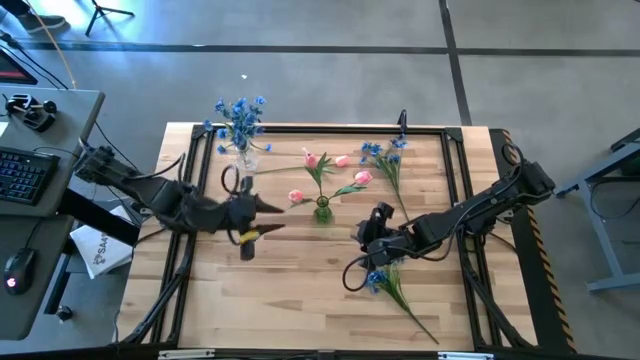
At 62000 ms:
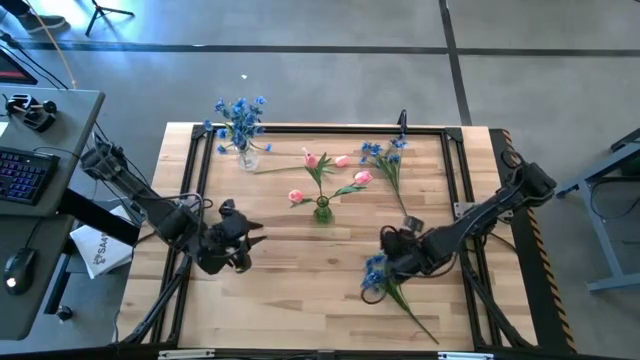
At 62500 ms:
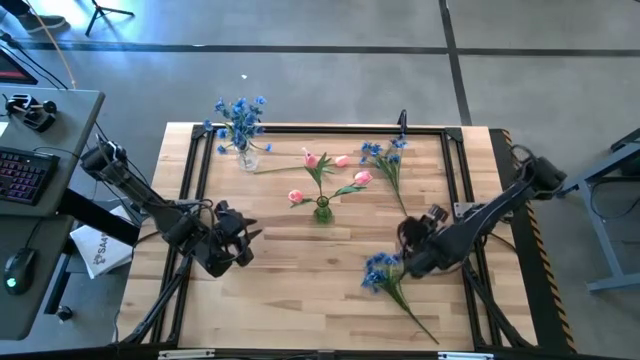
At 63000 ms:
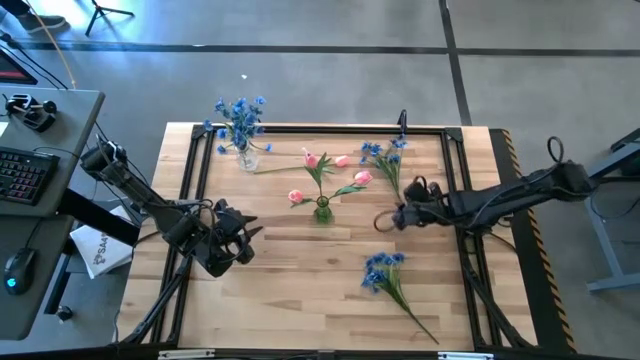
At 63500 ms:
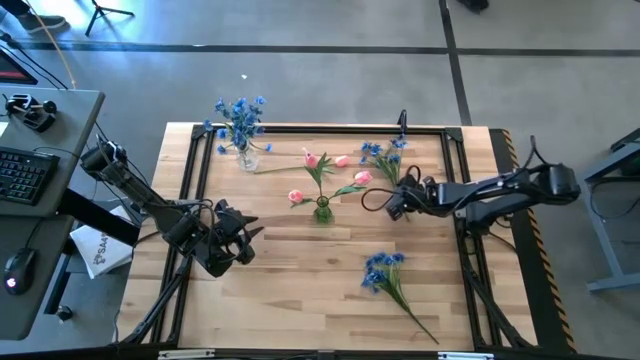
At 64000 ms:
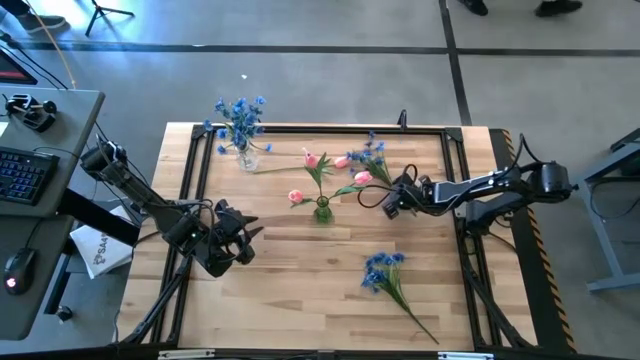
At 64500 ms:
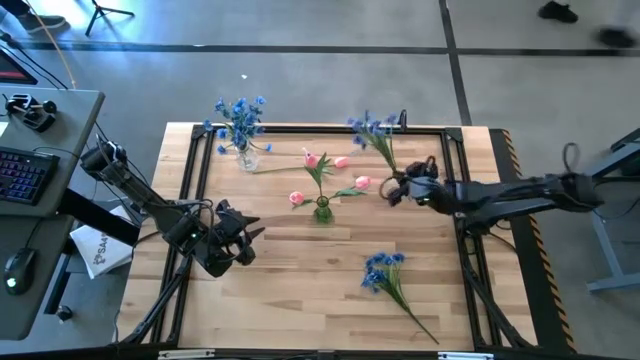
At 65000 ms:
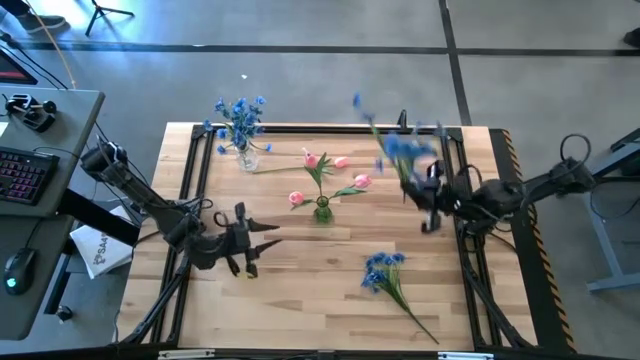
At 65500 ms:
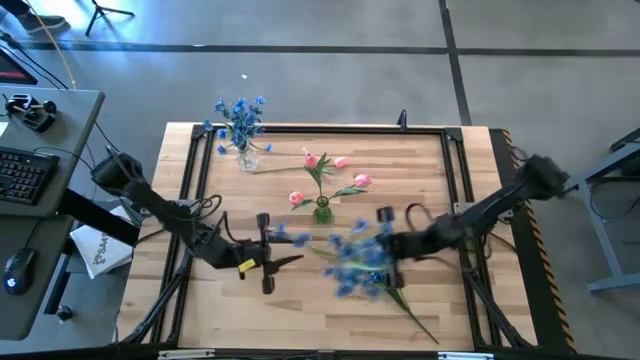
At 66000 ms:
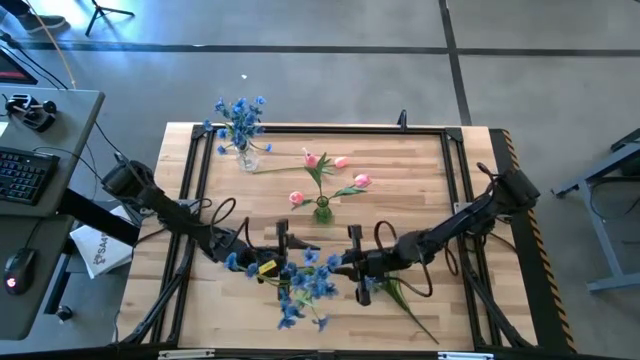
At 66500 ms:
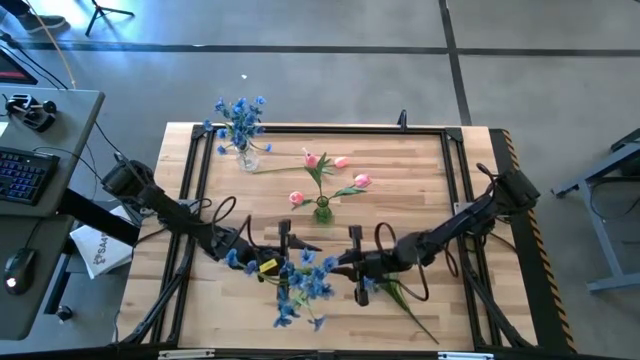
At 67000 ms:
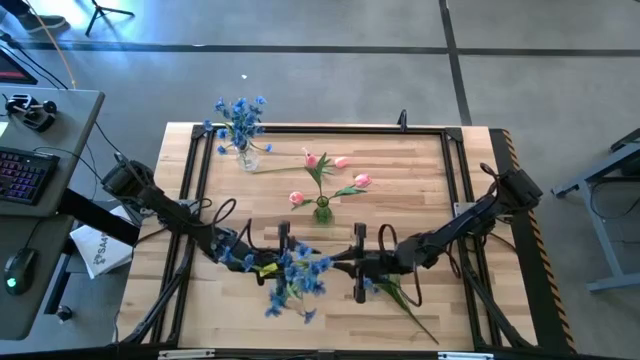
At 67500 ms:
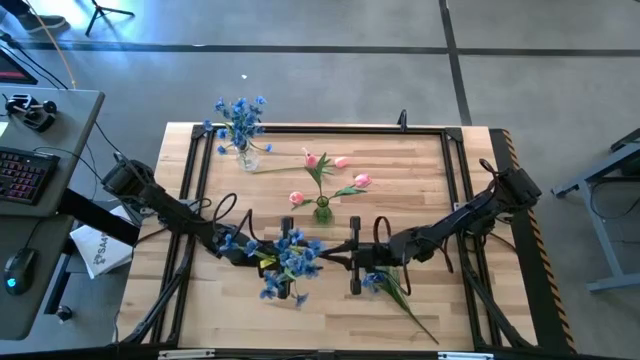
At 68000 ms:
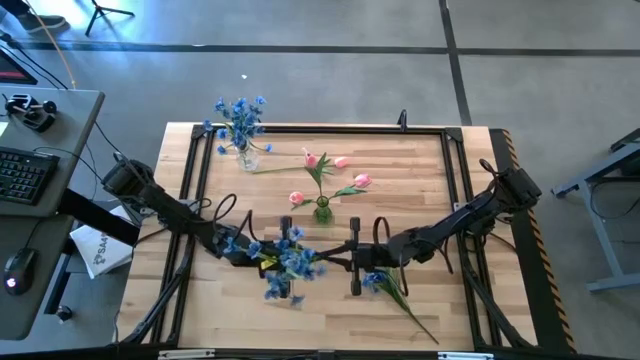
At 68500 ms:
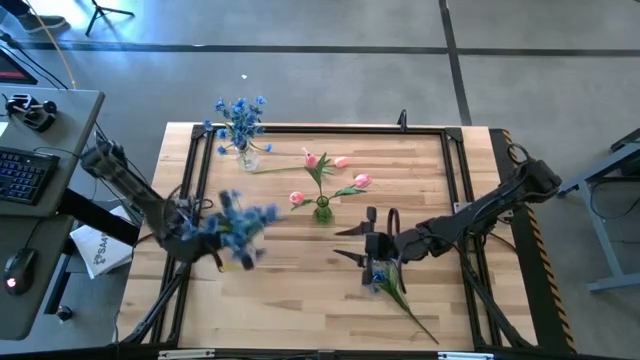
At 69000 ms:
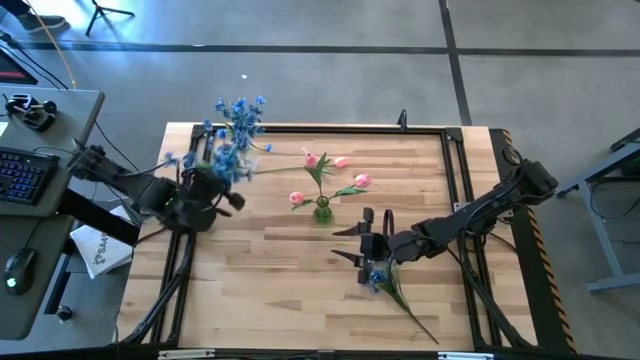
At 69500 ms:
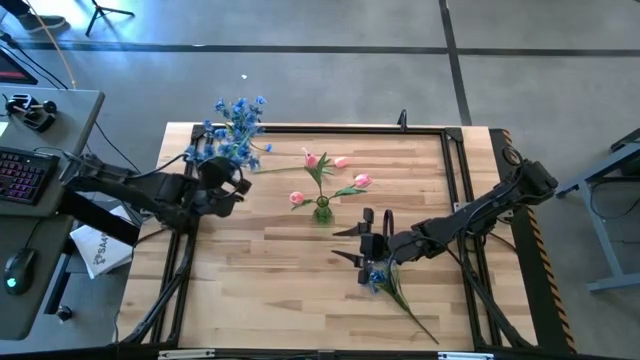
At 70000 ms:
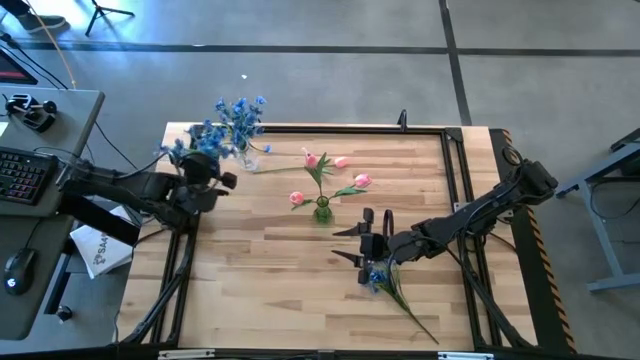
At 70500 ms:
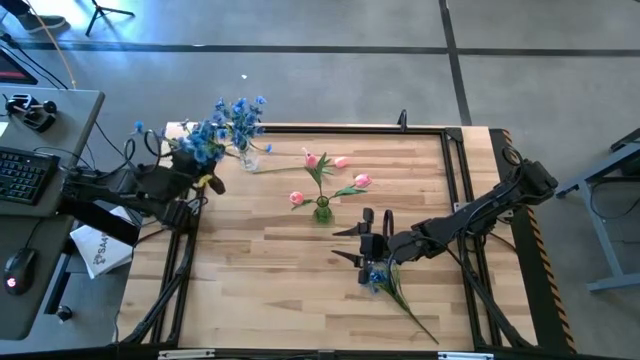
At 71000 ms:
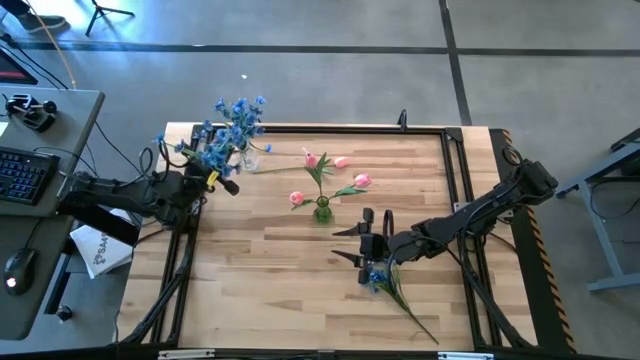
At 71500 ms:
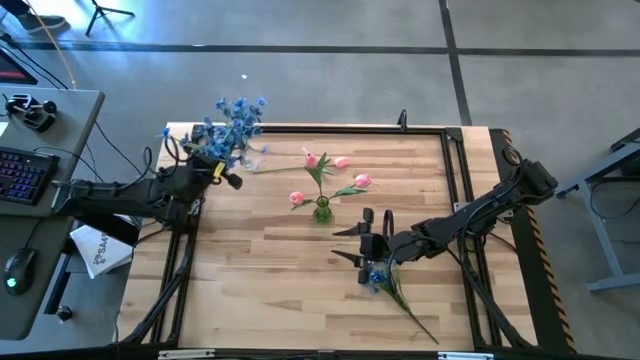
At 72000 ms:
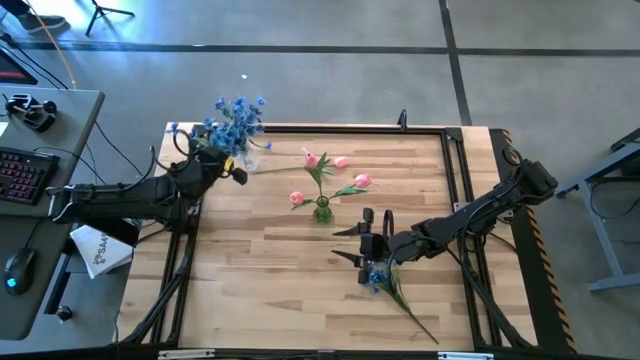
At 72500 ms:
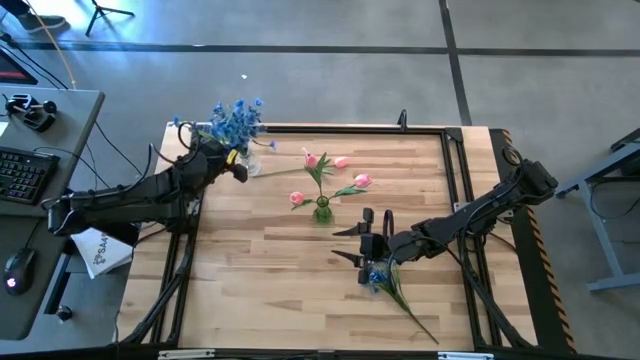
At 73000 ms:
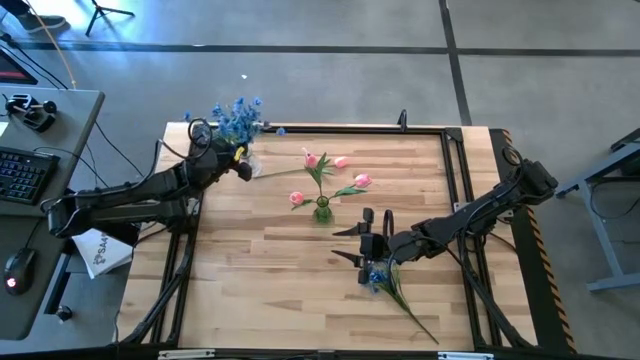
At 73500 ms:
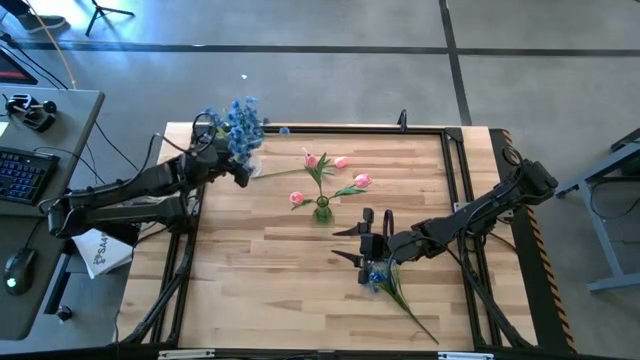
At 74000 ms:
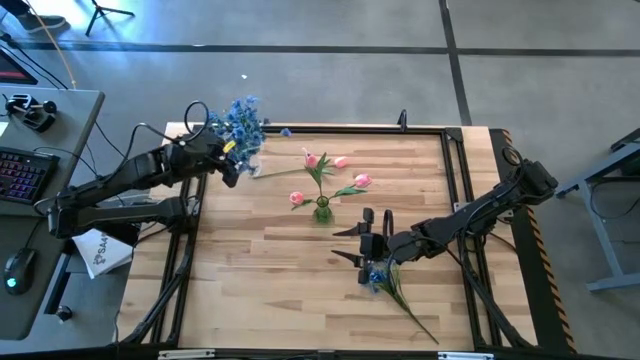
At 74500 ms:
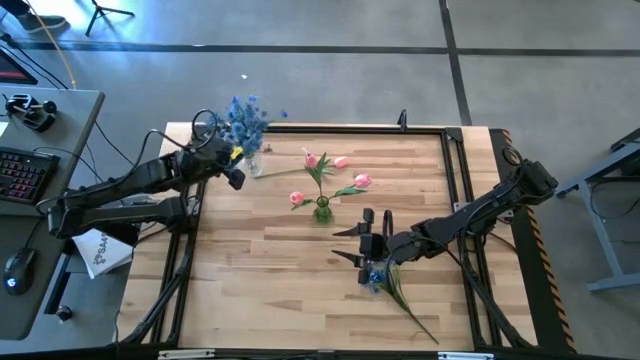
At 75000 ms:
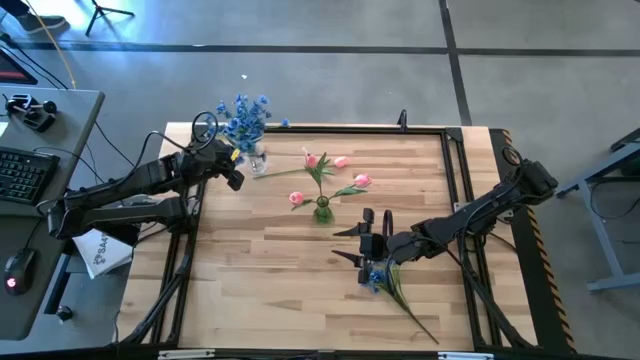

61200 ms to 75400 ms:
Task: Sort flowers into vase by color
Put the blue flowers into the transparent vase

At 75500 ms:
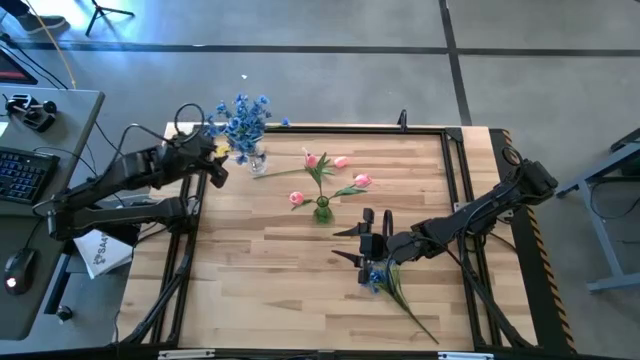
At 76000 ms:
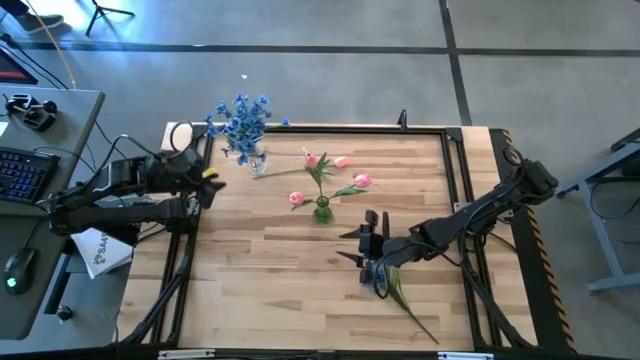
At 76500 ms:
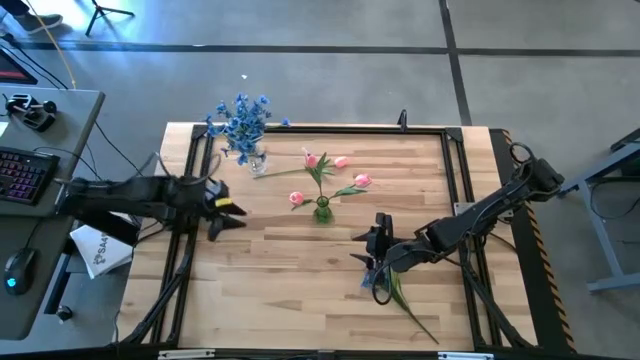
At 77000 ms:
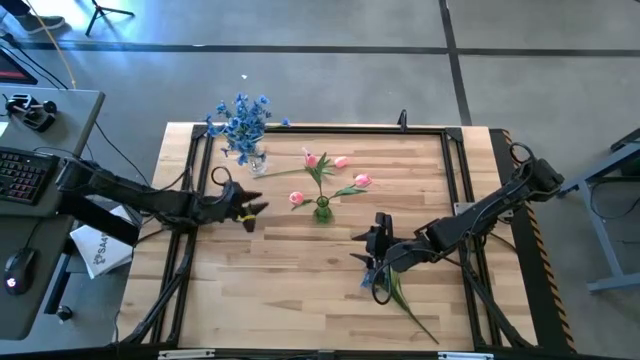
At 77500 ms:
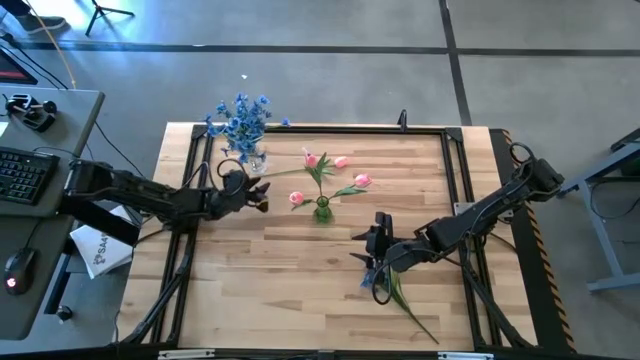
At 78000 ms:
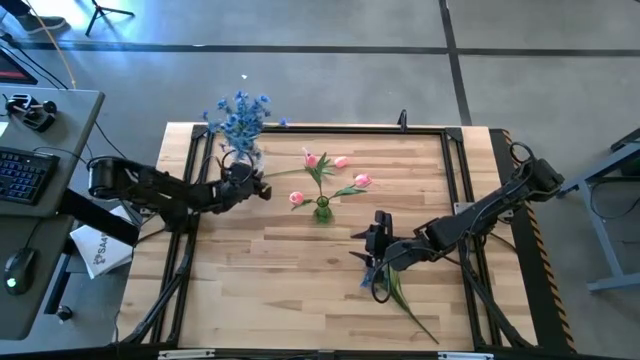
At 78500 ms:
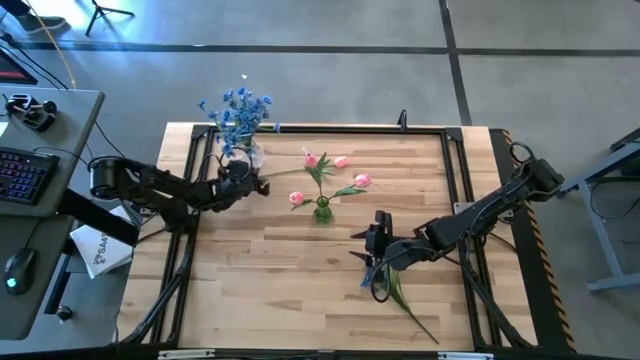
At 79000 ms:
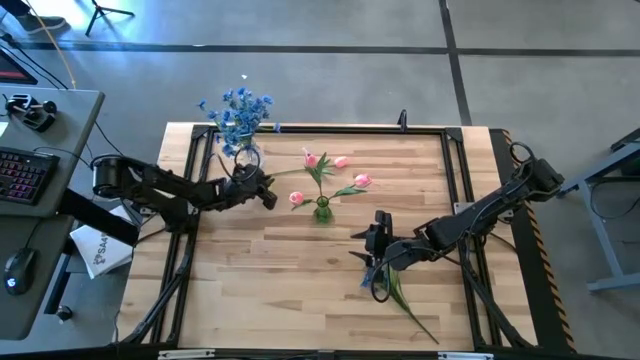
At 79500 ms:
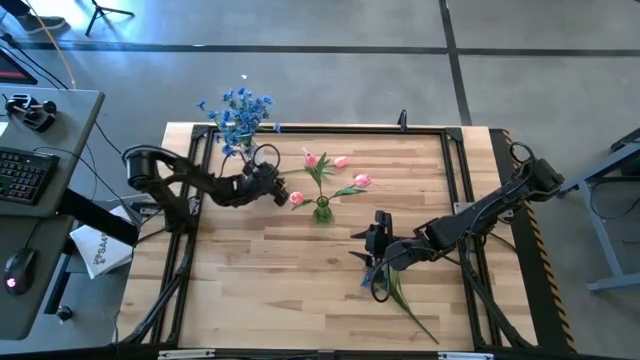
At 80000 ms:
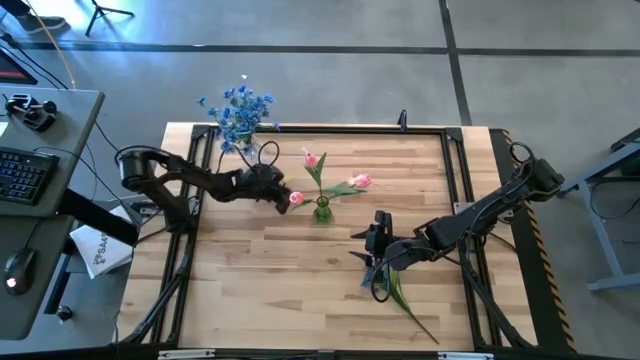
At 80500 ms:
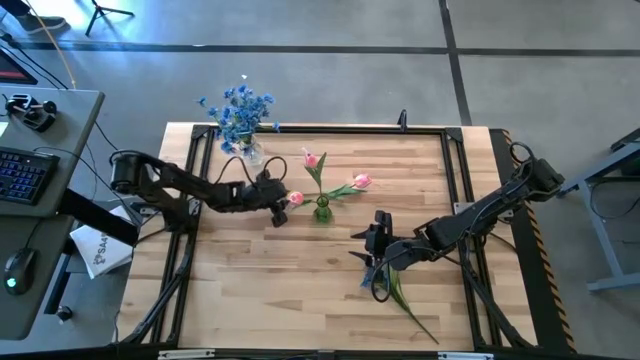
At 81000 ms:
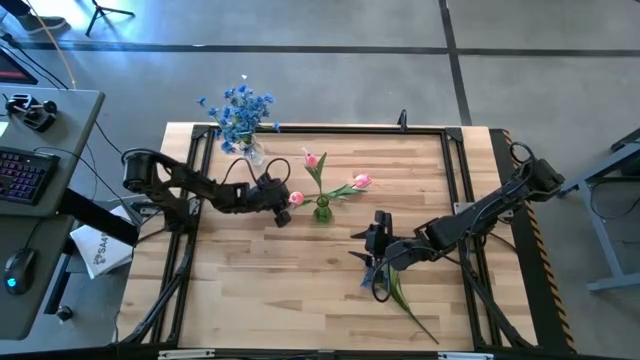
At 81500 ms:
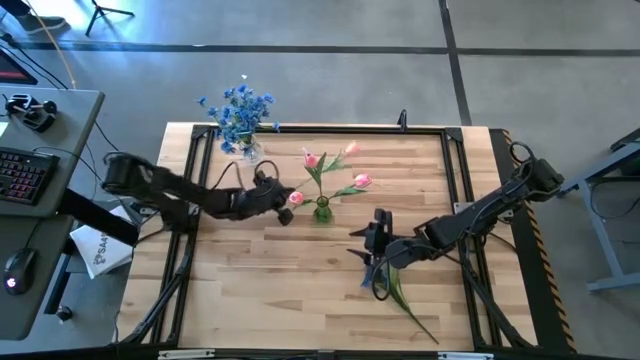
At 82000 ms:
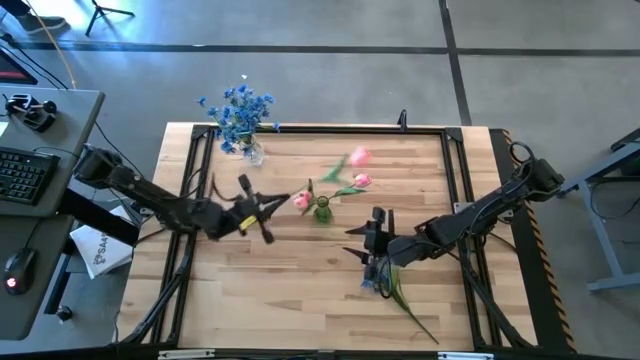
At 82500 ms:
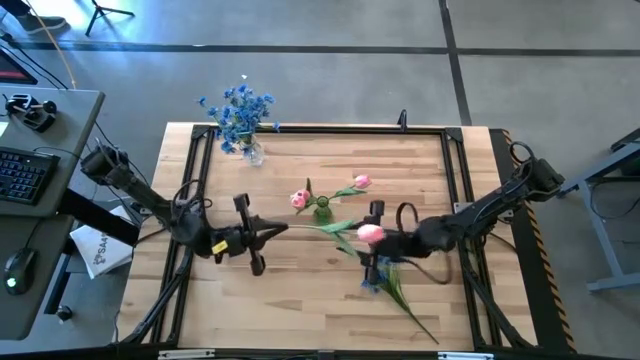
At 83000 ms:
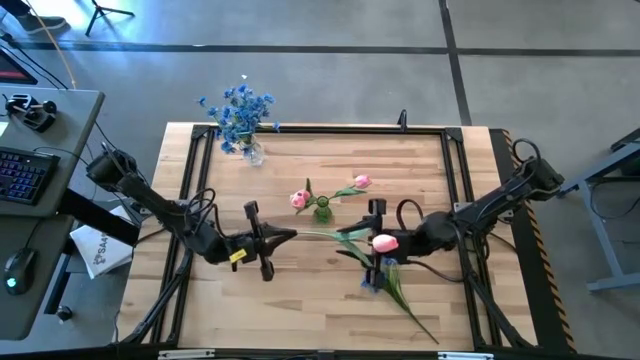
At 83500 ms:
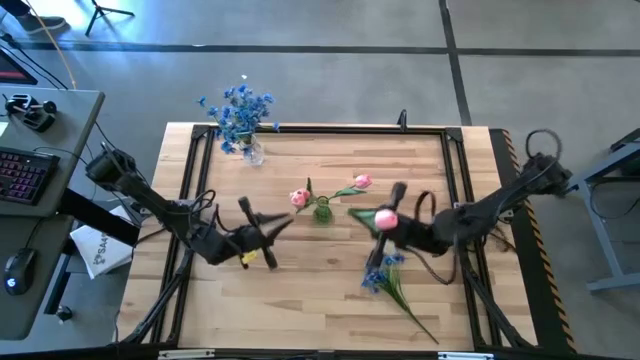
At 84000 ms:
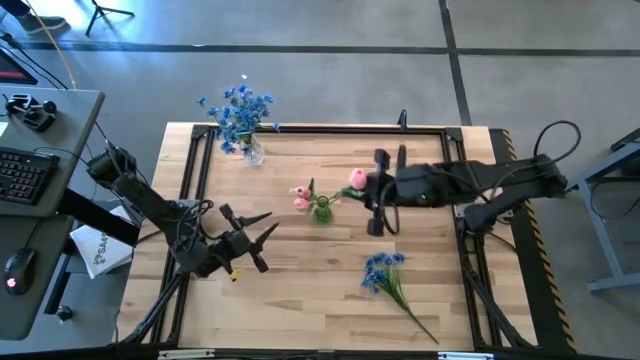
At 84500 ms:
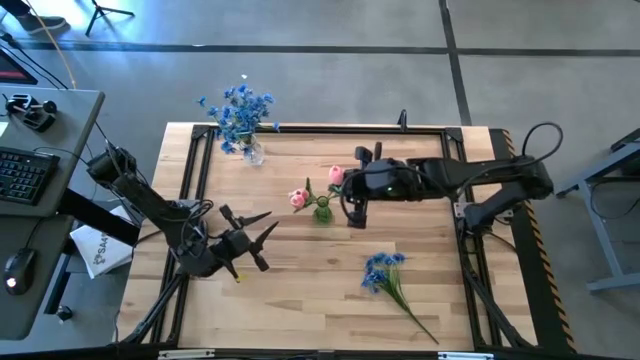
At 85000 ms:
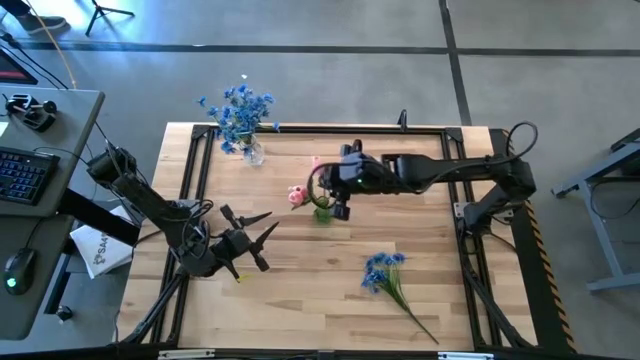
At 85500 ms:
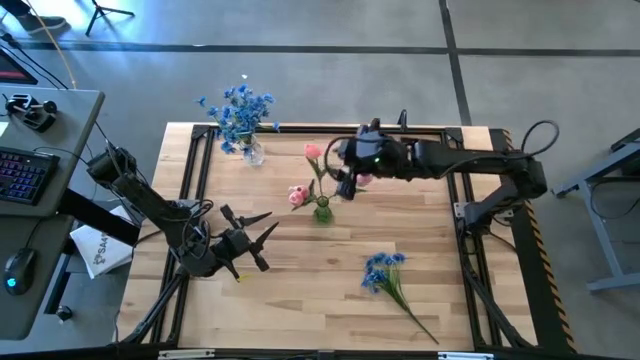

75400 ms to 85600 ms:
Put the pink tulip into the green vase
